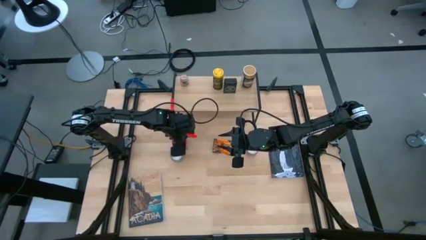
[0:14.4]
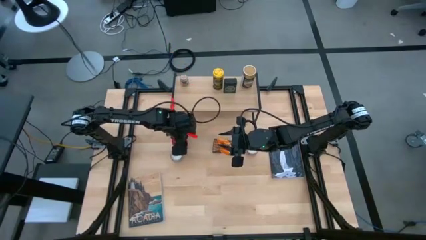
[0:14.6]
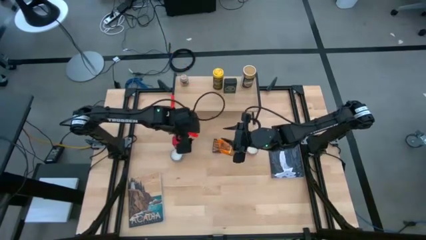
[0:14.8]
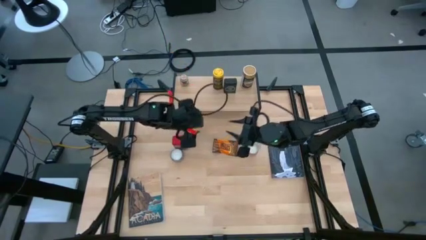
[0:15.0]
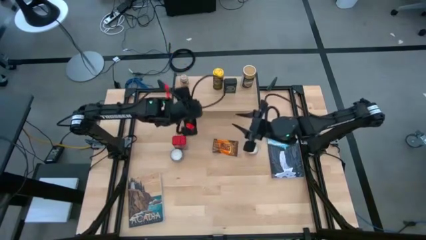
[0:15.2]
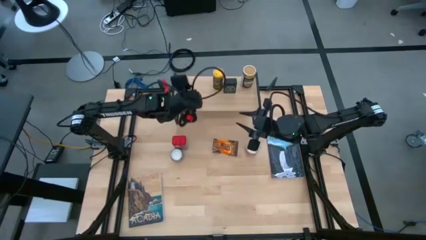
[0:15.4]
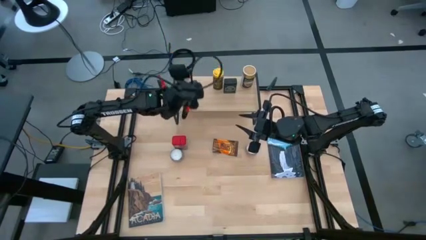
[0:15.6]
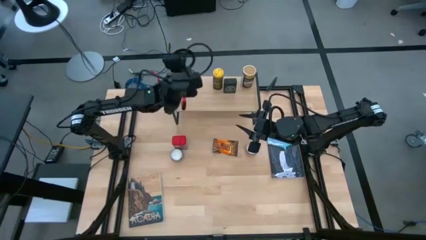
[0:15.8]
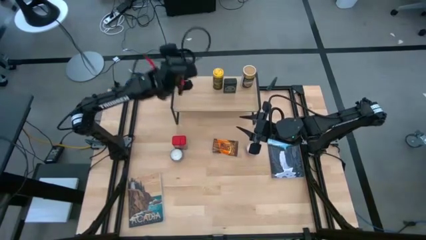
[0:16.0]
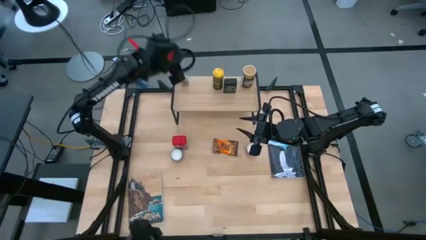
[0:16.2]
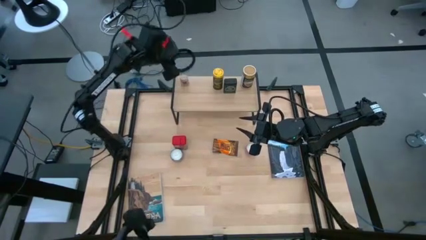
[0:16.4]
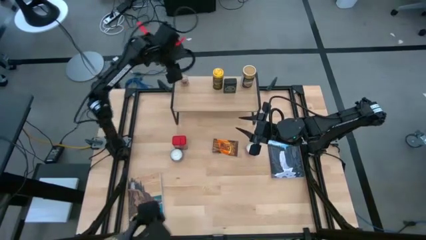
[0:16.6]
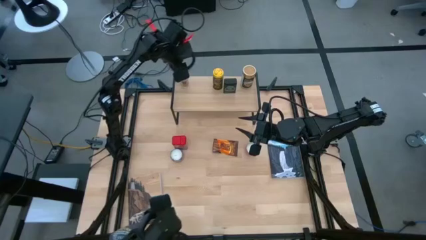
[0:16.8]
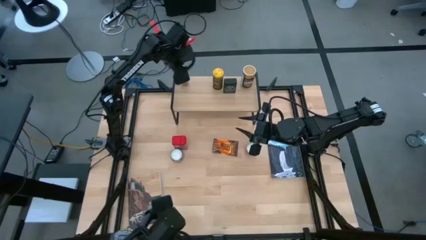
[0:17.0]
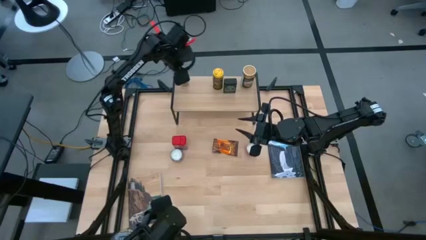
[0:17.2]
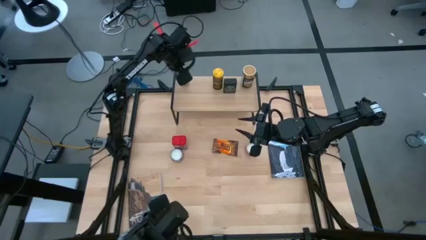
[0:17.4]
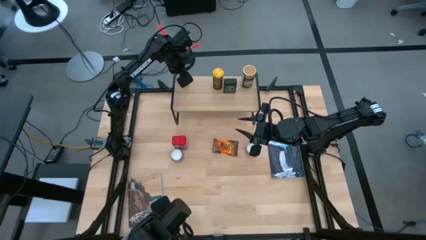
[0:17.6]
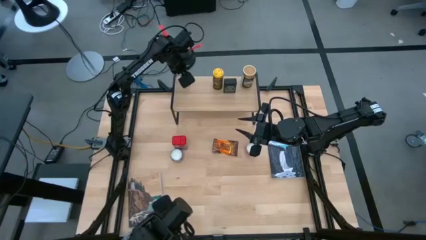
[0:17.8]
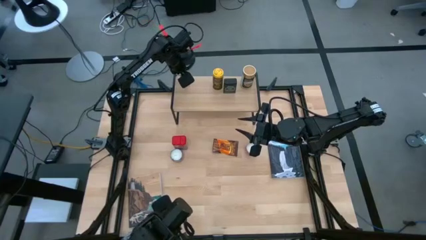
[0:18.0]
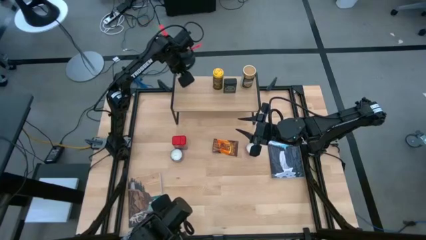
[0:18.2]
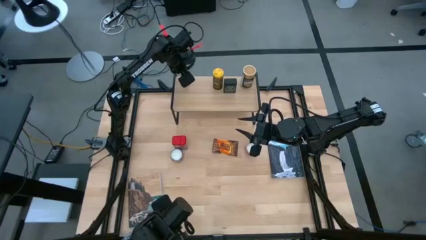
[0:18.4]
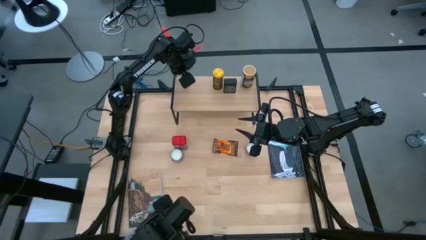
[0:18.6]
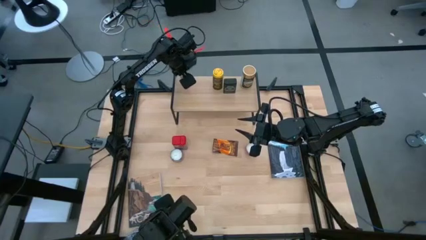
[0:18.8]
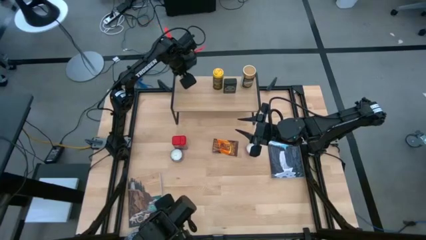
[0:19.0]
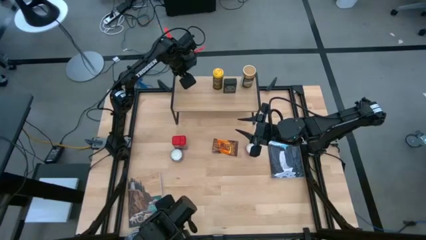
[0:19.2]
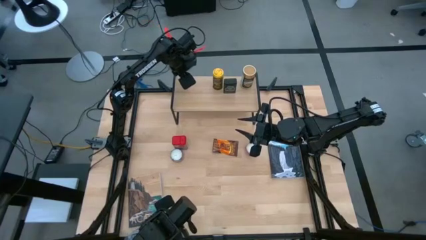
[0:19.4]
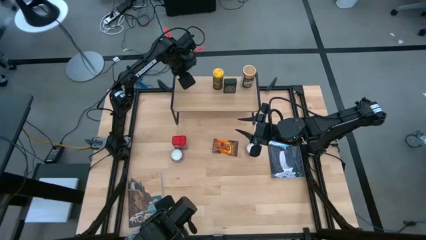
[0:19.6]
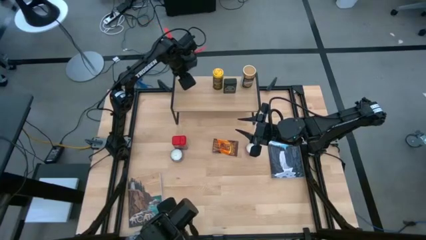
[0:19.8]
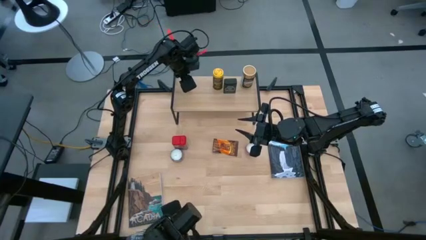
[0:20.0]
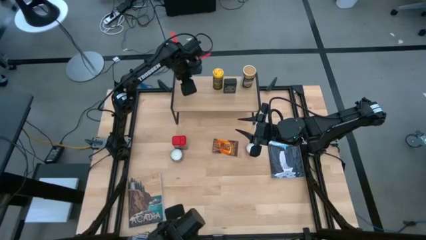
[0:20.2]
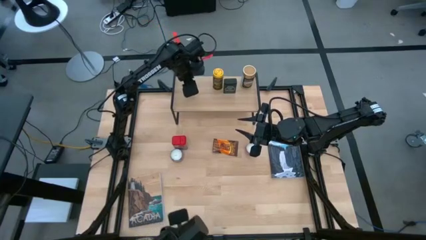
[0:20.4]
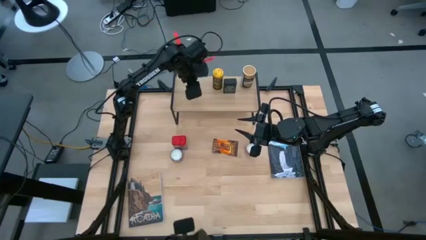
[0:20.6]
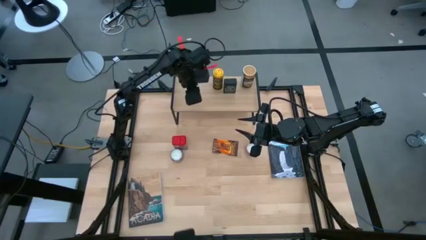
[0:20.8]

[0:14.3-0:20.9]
Task: Shelf spices
Remove the brown seasoning bottle from the shelf

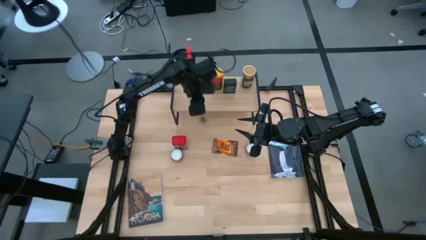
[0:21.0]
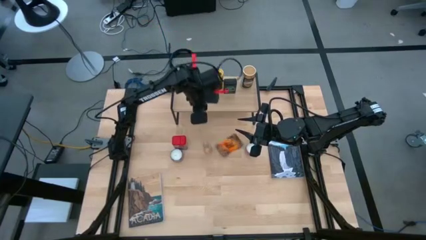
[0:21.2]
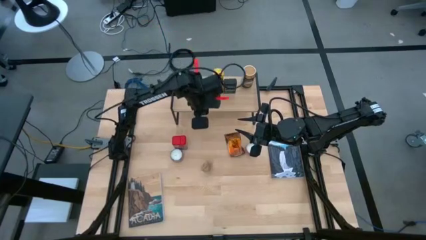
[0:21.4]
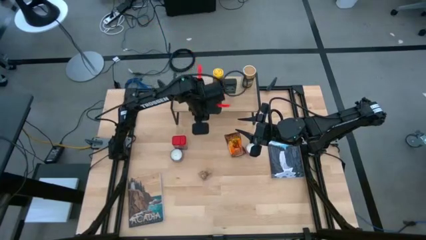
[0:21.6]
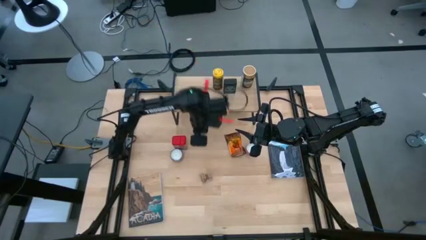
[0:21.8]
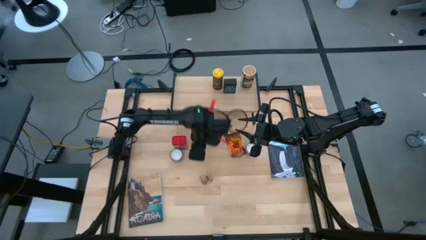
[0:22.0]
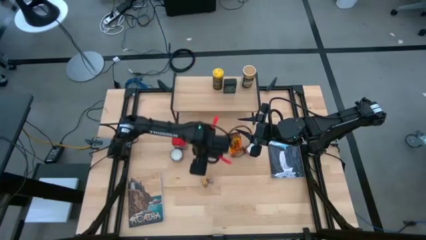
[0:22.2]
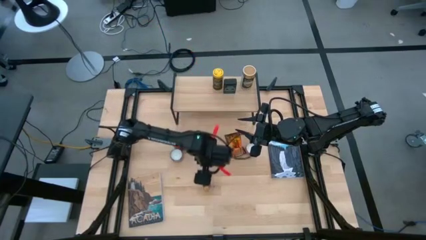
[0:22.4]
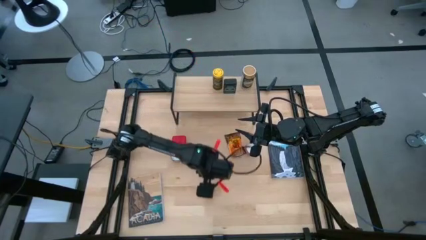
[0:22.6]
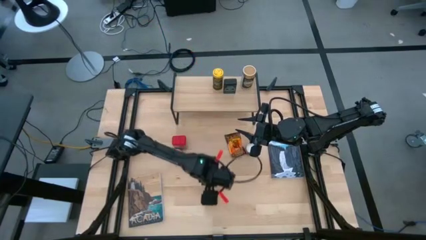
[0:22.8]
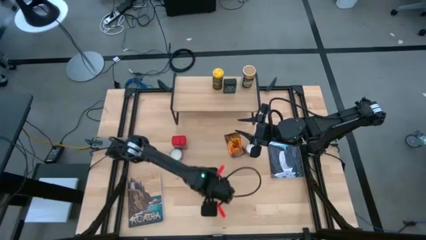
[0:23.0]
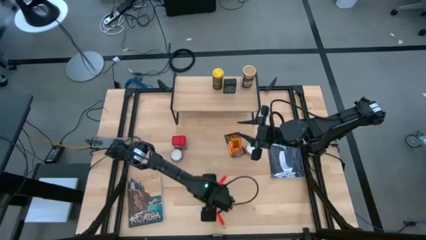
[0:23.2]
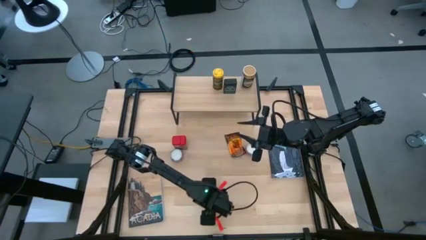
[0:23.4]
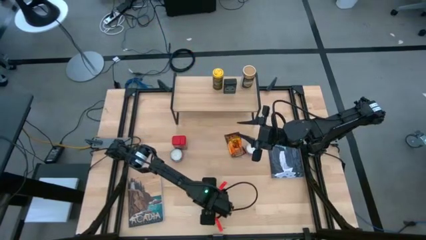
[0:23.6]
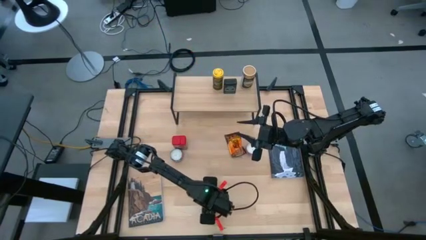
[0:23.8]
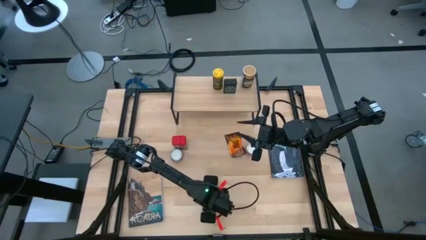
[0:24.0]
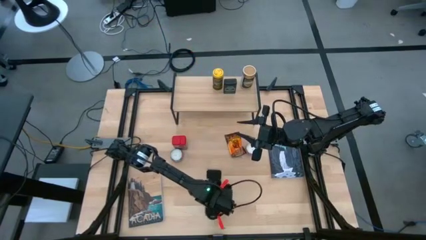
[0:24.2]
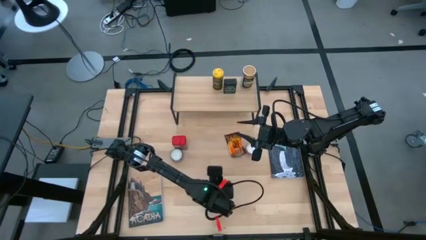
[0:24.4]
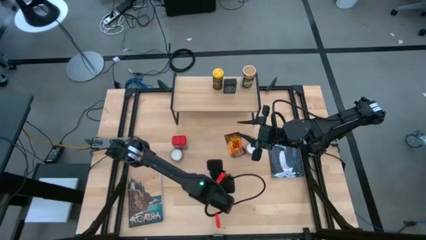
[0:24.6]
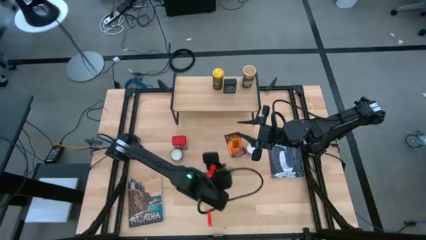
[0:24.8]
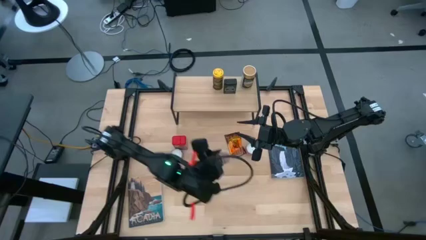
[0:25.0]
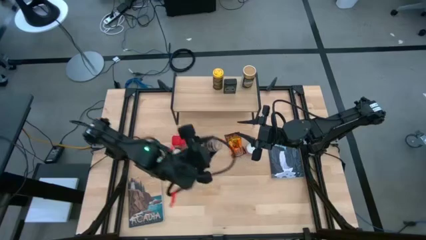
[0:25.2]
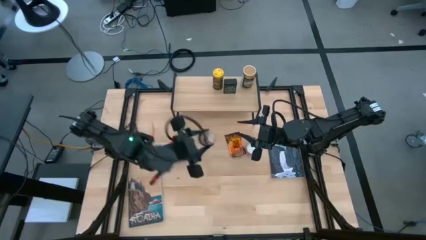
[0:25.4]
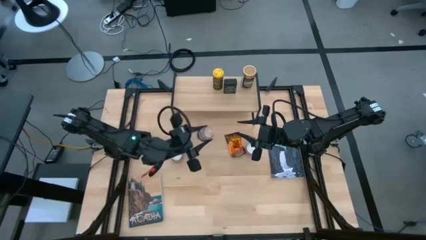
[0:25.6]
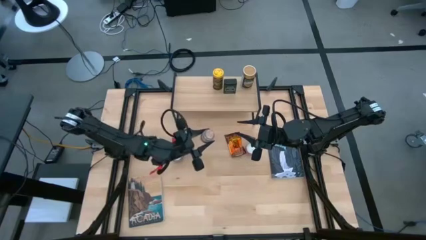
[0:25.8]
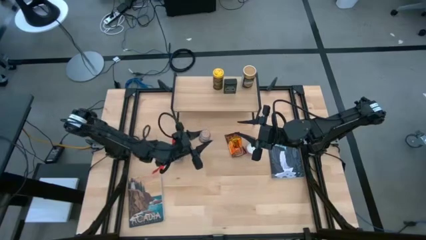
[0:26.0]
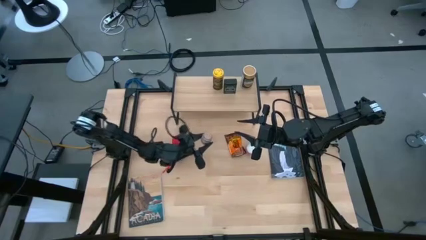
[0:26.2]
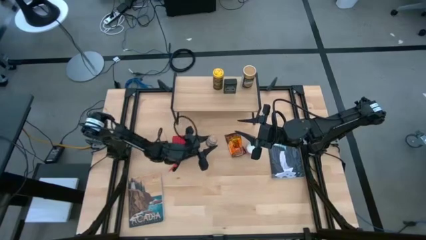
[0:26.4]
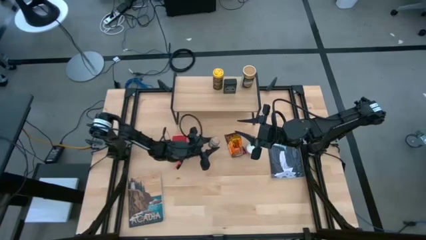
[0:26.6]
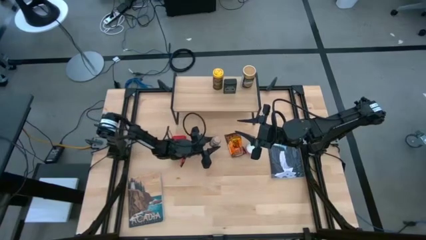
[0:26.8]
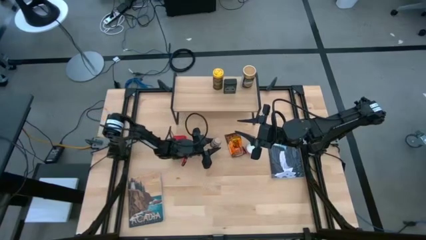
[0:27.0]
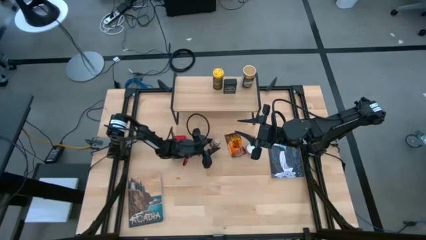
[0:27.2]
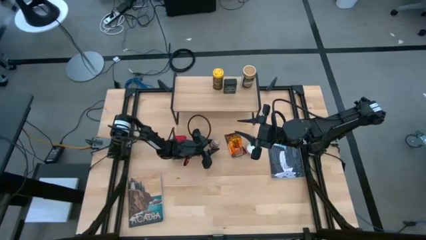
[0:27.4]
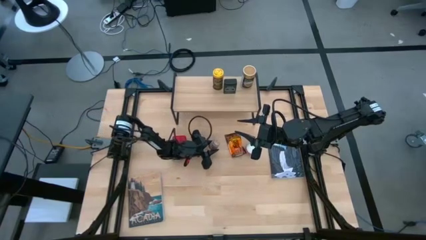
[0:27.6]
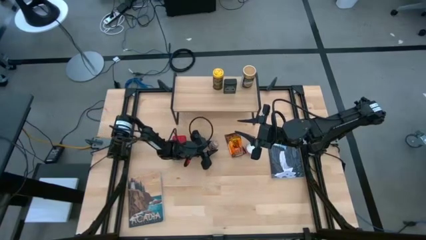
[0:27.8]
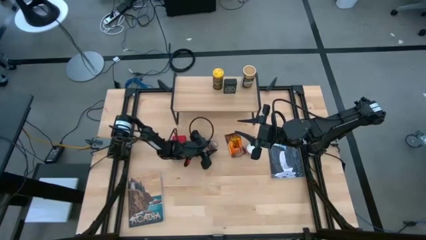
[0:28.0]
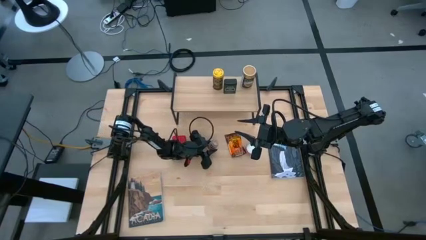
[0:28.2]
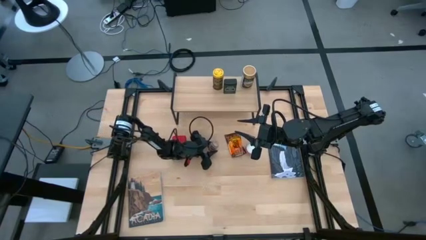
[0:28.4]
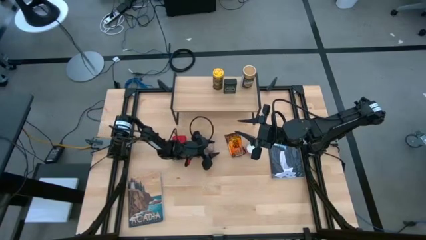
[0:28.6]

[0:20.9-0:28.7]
Remove the brown seasoning bottle from the shelf

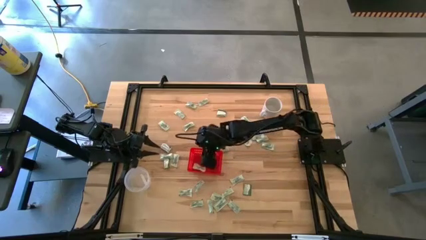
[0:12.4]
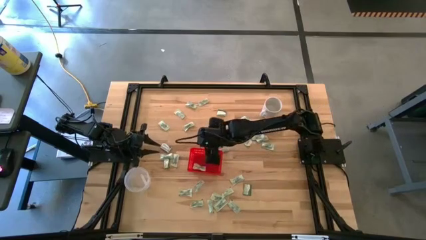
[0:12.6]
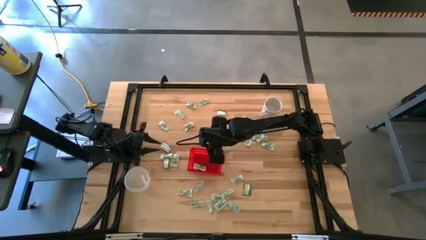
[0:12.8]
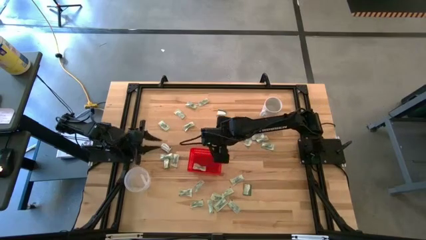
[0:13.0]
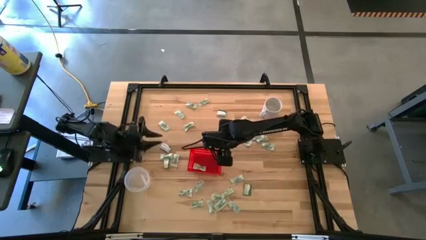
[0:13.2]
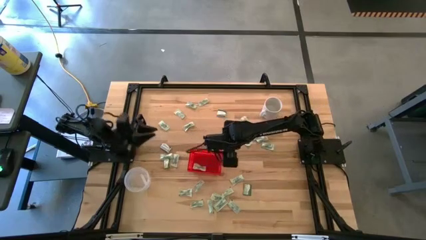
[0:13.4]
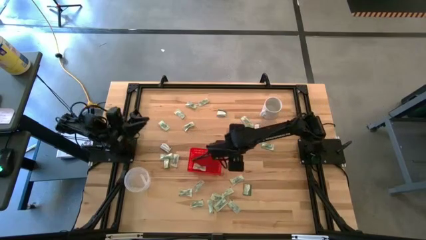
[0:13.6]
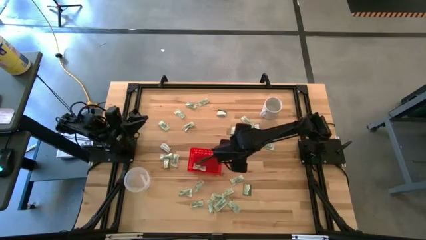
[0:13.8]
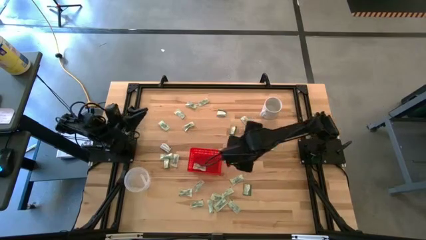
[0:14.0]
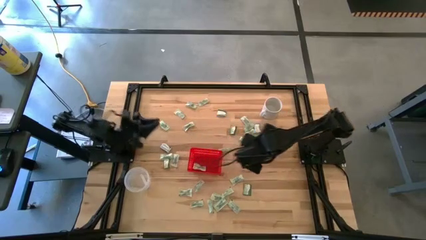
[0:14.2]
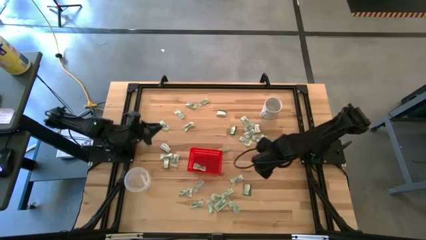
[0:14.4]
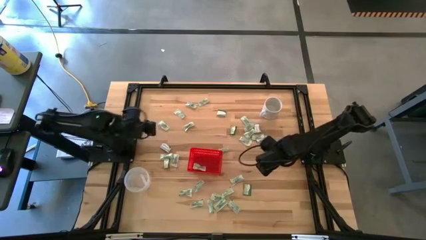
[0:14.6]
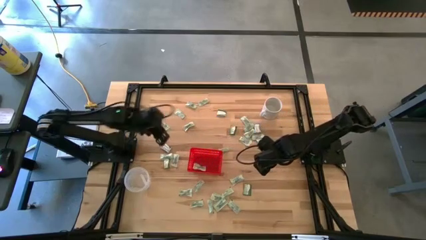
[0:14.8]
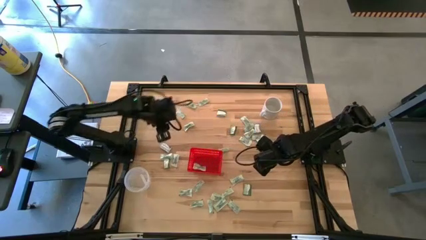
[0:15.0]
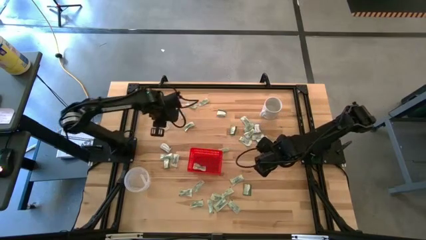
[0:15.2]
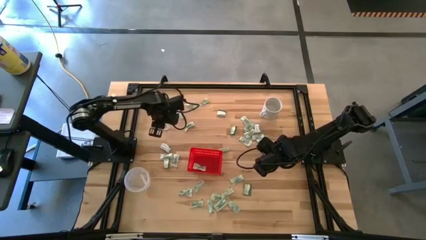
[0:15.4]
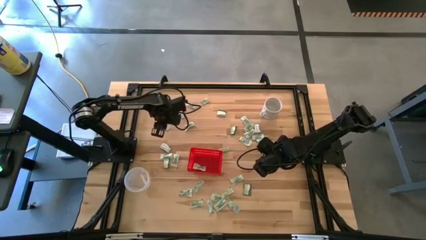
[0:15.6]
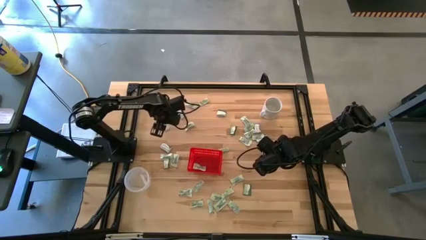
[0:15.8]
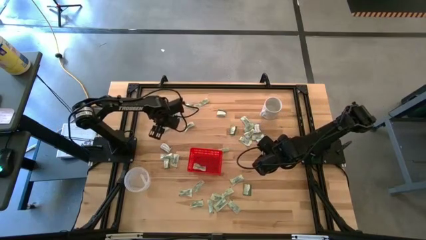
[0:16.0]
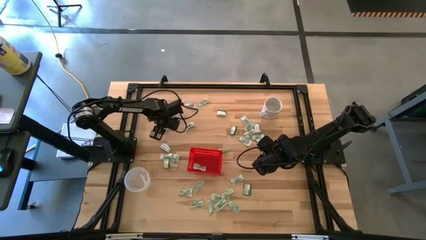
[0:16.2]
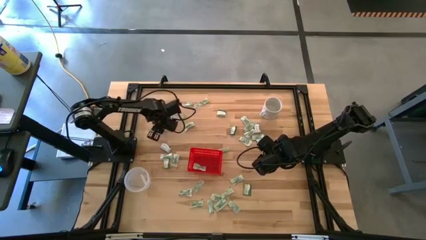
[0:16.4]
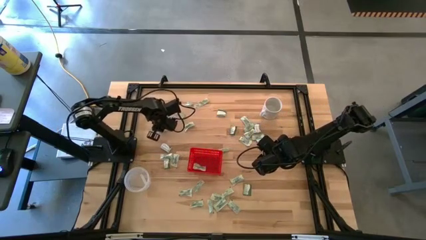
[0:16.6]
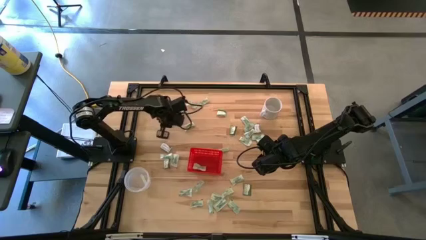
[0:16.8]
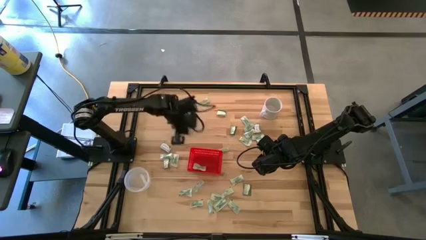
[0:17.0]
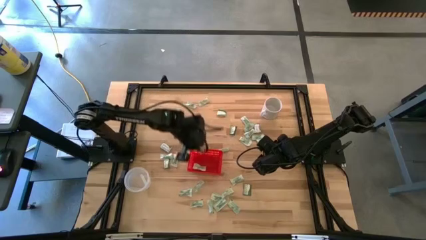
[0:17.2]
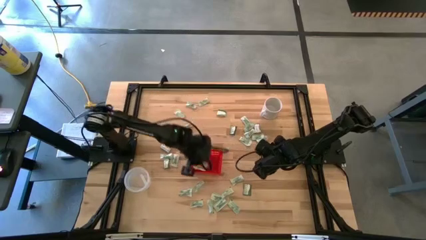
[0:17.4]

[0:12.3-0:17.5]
Task: Pick and place Stevia / Truvia into bins
Put the green stevia packet into the red basket
